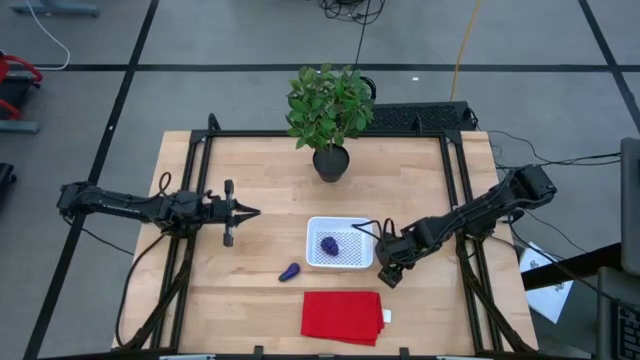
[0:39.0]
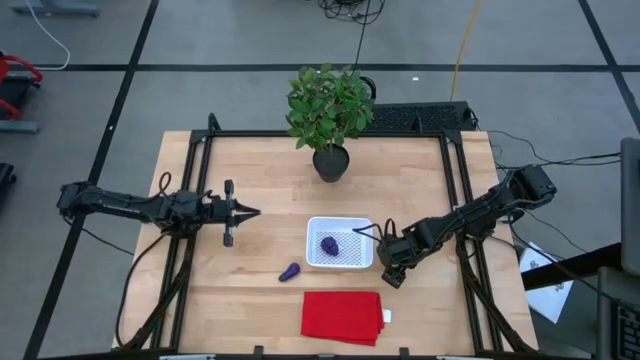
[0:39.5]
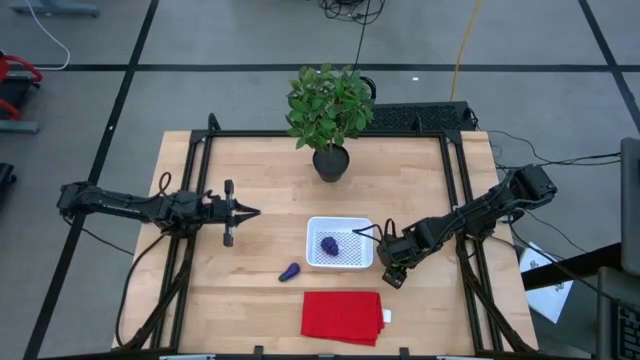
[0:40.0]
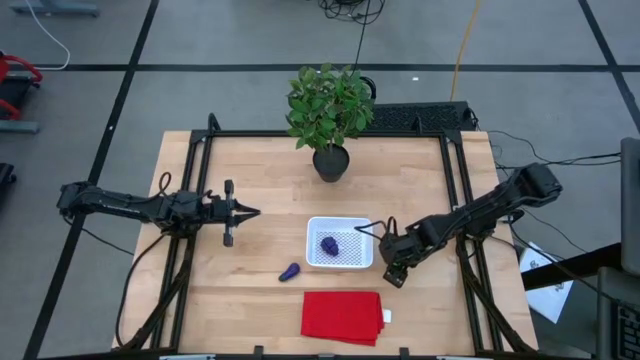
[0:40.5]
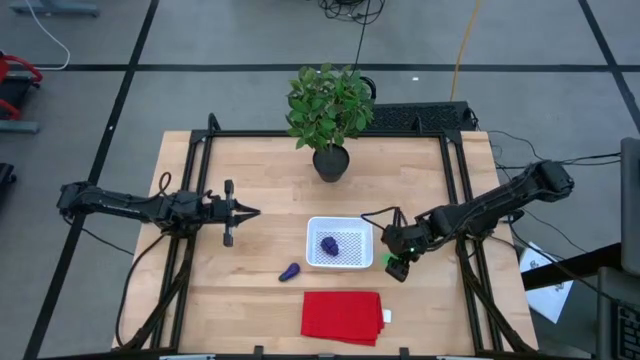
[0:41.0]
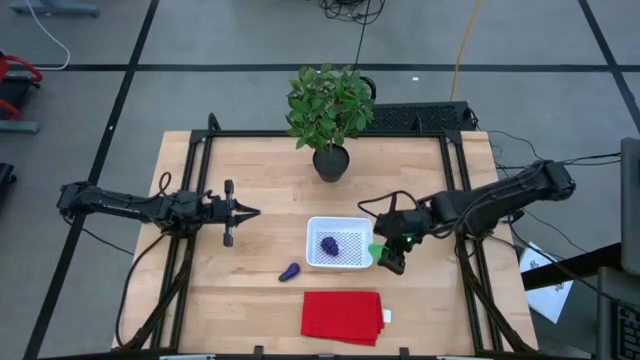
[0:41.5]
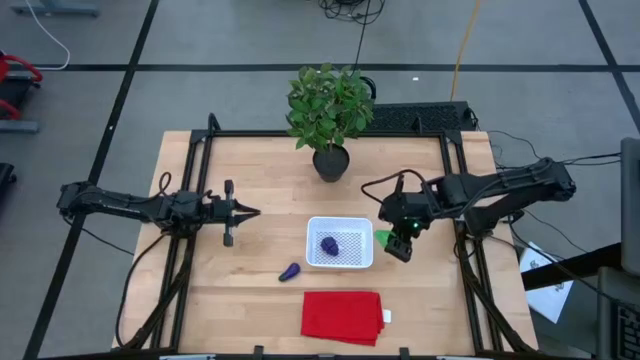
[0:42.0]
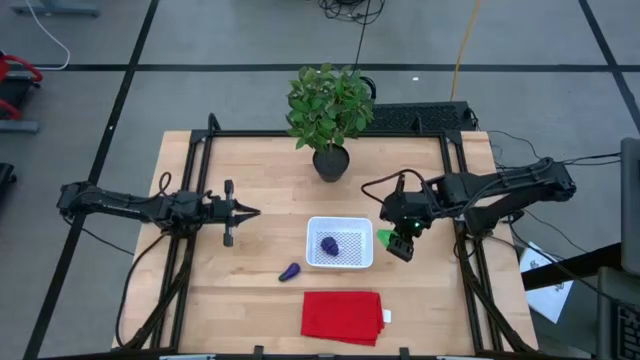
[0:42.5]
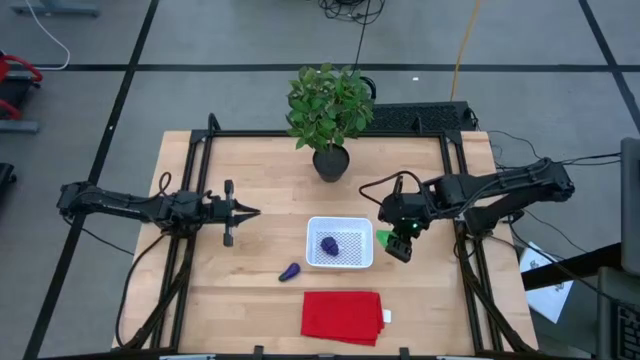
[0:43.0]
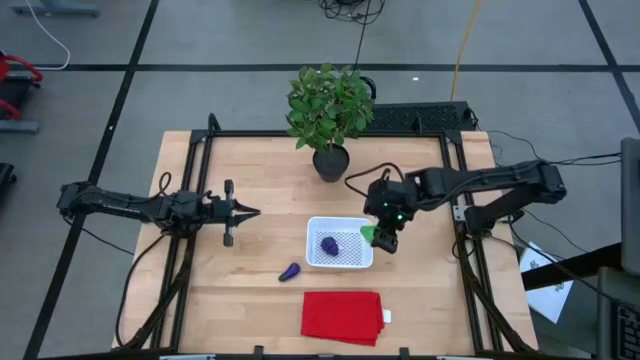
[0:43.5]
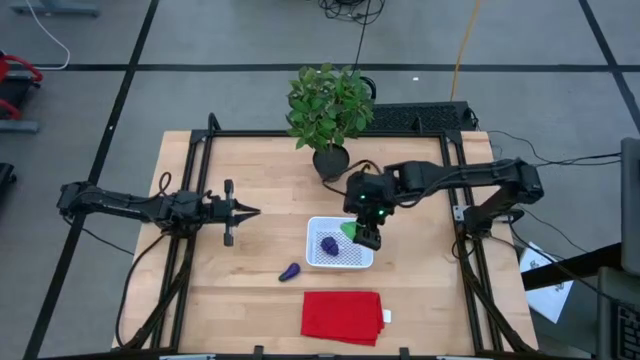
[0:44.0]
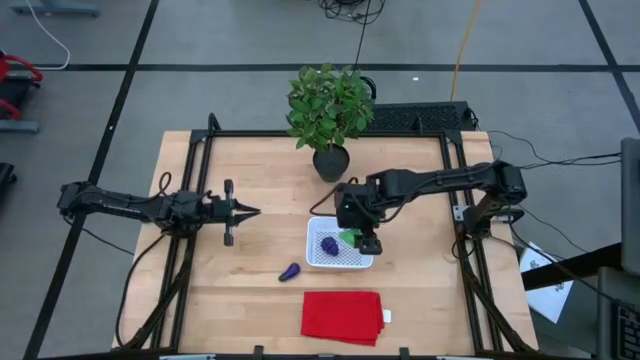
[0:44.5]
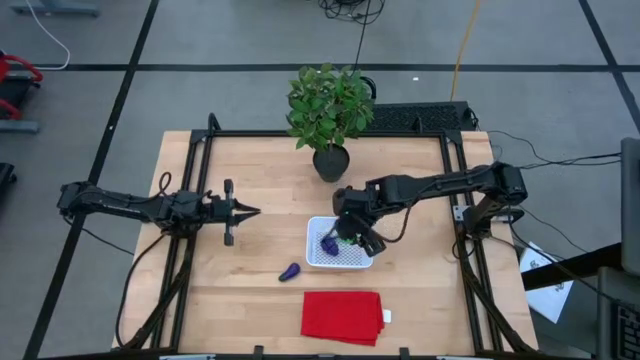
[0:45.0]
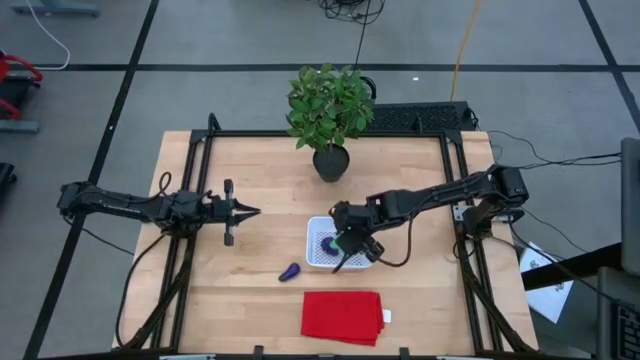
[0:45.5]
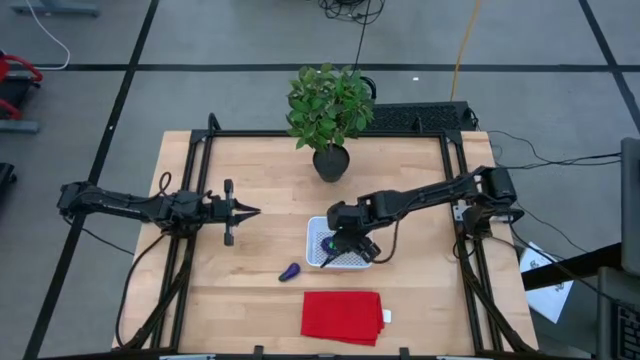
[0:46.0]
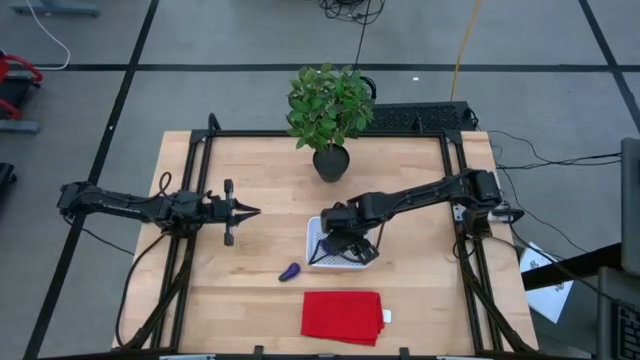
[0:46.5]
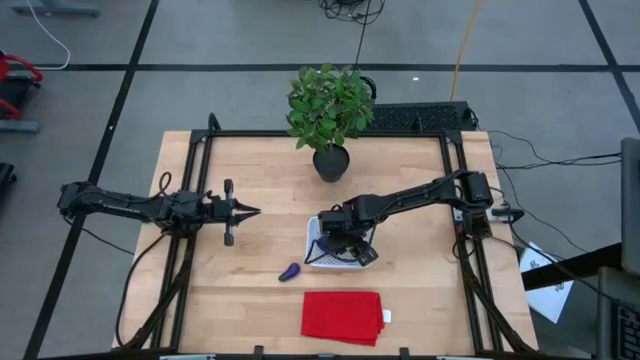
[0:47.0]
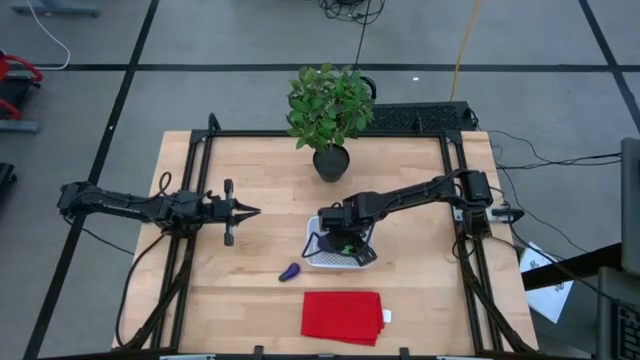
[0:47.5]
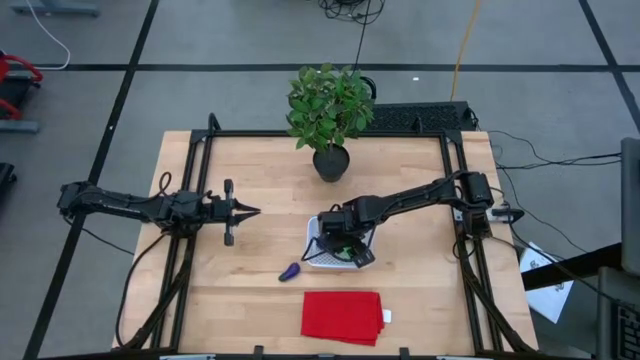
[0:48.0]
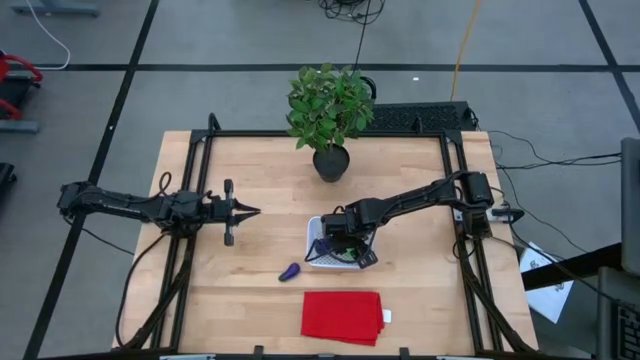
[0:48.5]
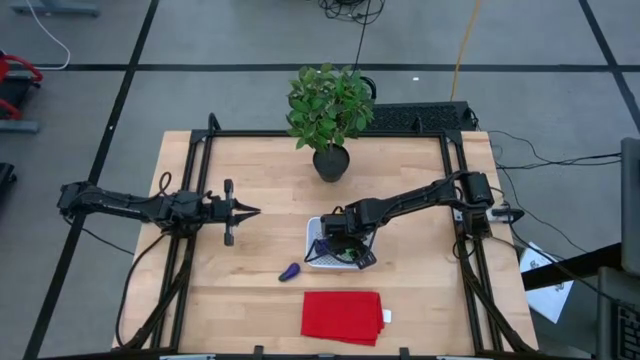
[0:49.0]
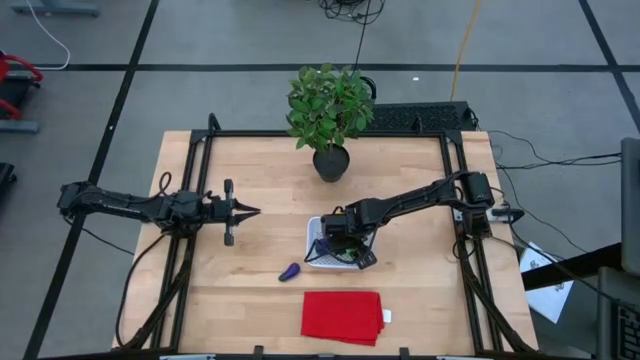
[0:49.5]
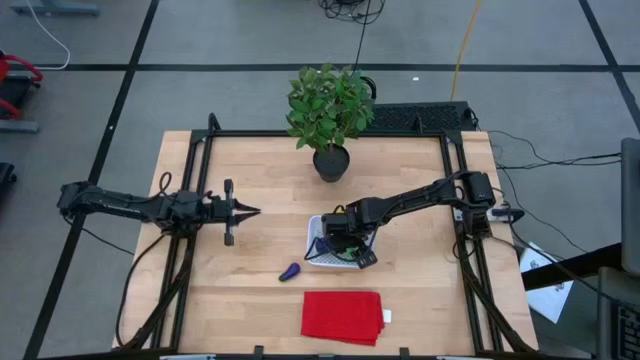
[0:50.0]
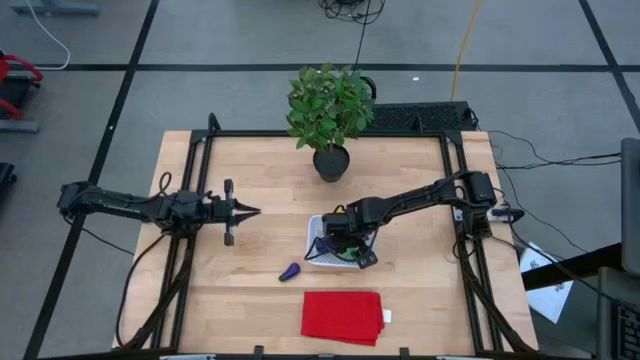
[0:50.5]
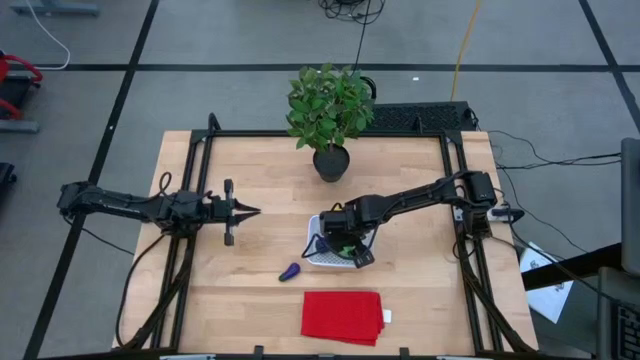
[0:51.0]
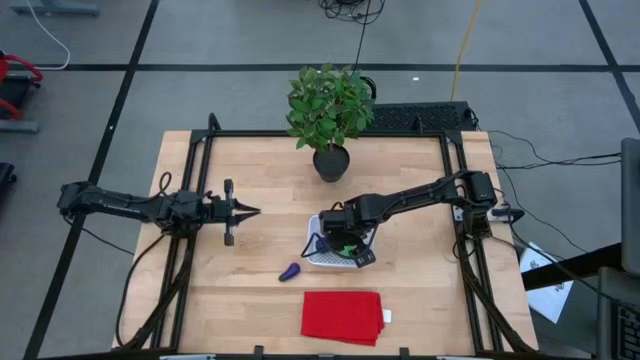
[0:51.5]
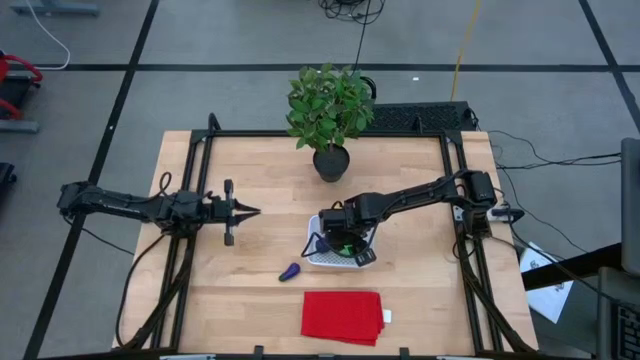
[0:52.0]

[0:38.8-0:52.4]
Task: Pick and placing Produce into tupperware
Put the green pear into the white bin

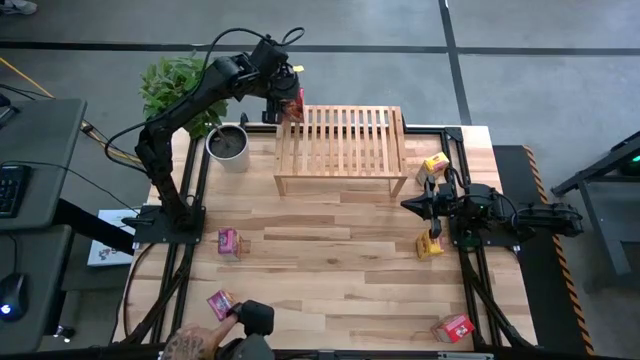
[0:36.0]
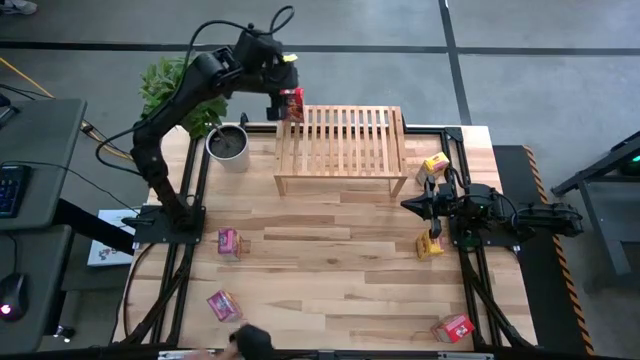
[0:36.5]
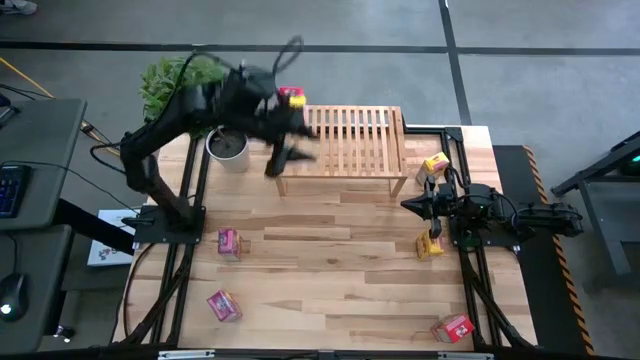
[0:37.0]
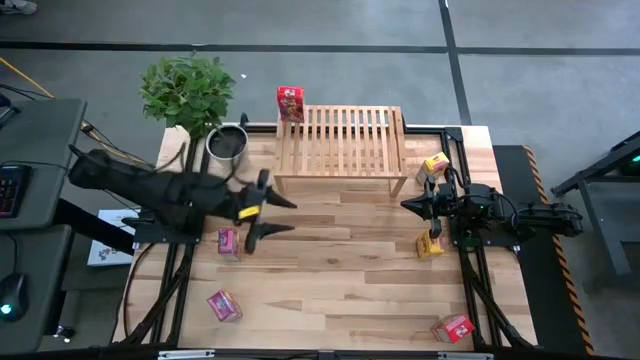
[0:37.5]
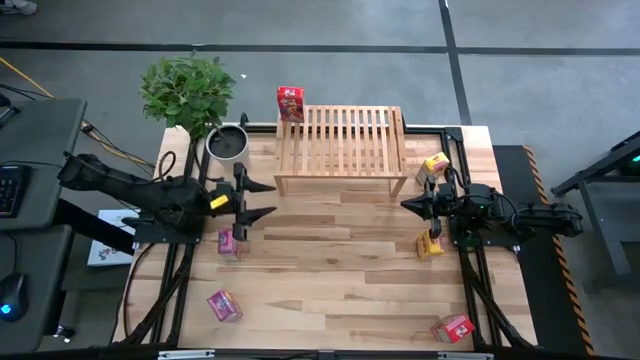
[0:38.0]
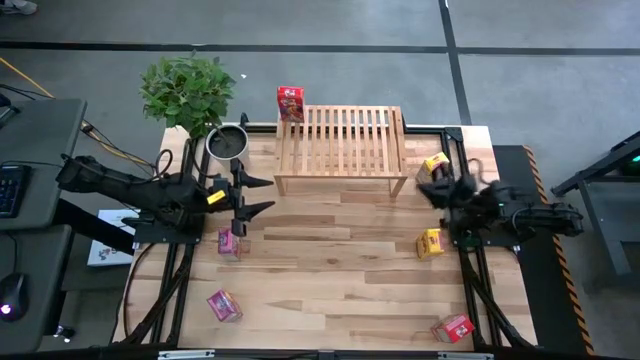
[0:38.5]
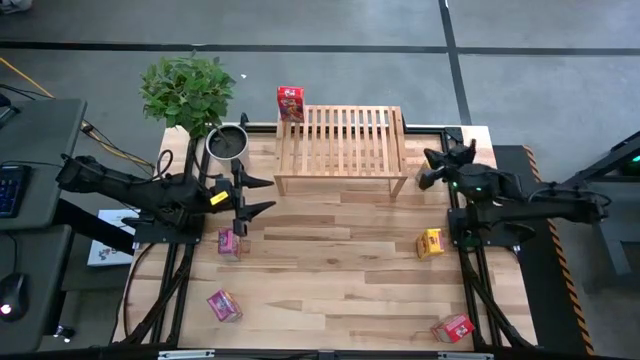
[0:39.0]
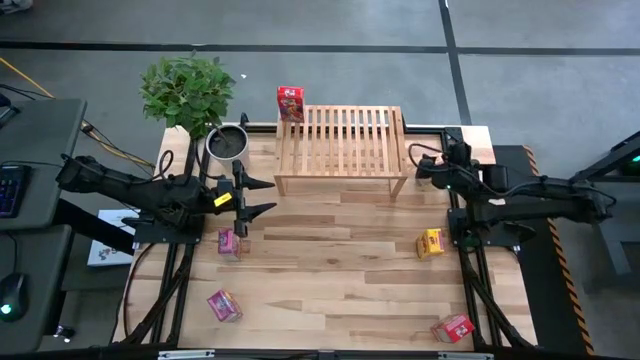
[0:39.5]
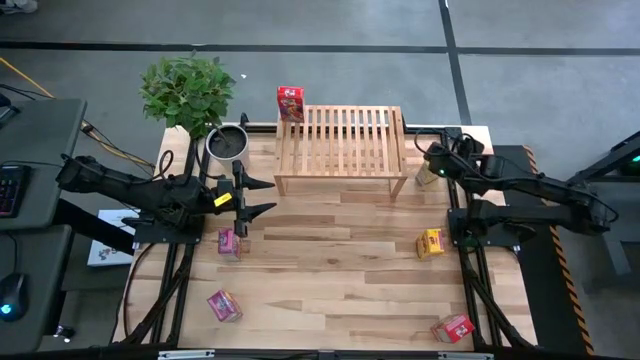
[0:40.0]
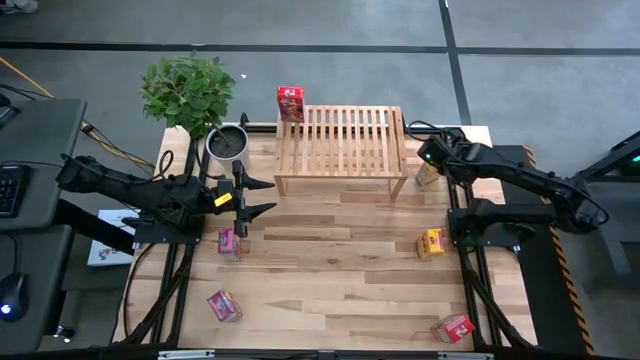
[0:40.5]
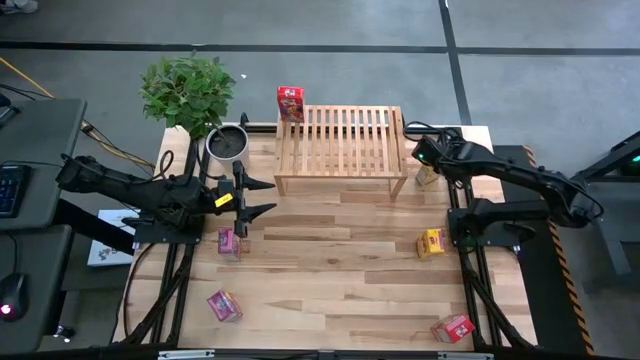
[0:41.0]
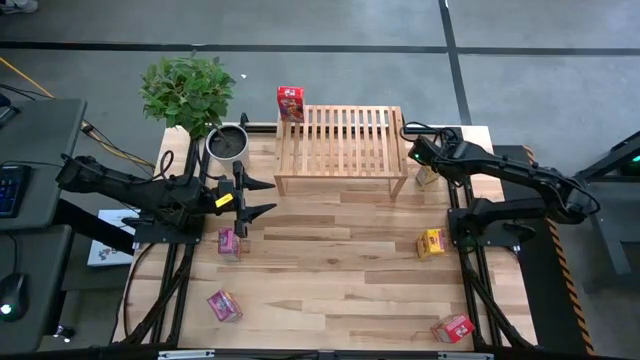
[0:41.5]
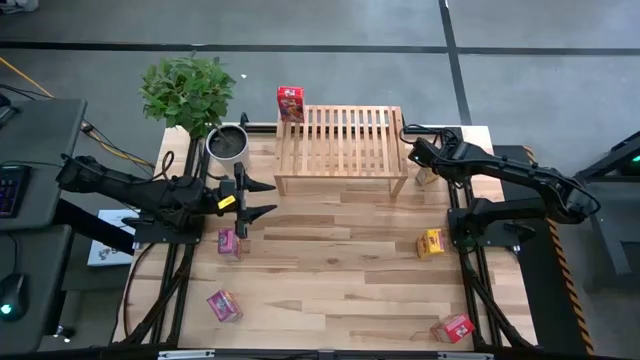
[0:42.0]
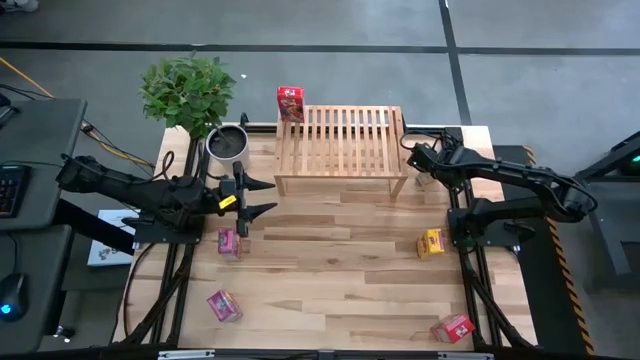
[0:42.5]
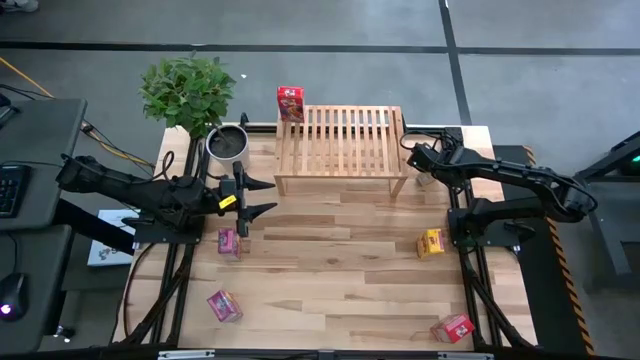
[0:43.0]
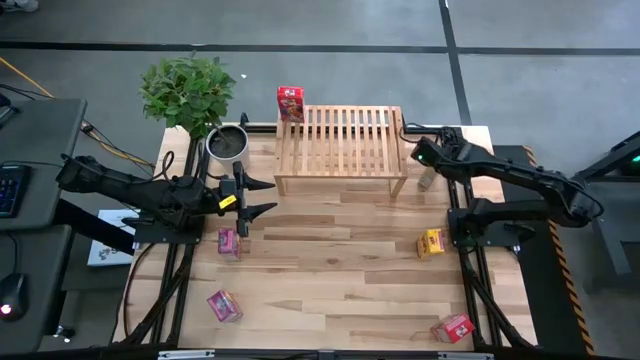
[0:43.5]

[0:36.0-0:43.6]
Task: Stack cereal on shelf
Put the top yellow cereal box on the shelf
